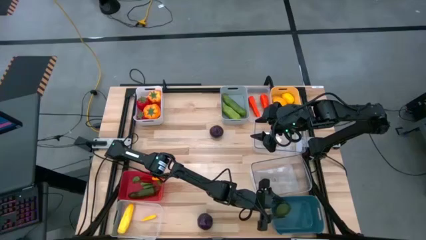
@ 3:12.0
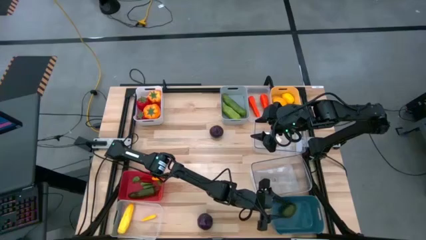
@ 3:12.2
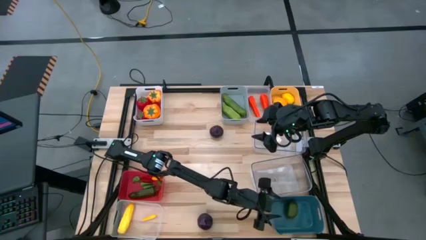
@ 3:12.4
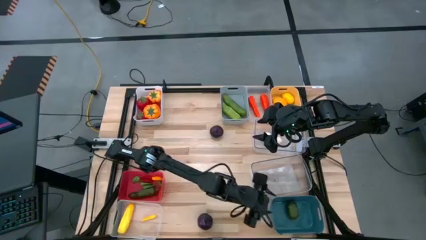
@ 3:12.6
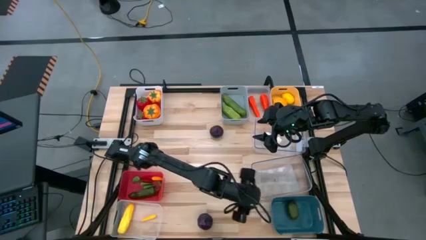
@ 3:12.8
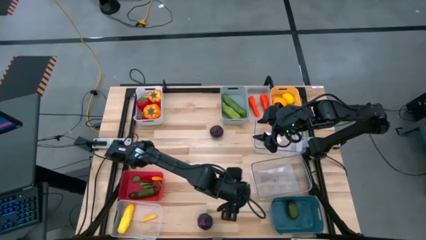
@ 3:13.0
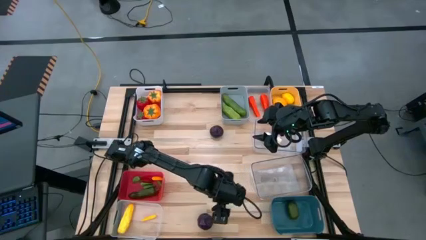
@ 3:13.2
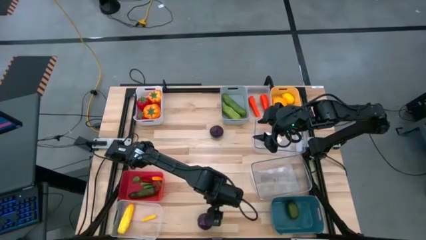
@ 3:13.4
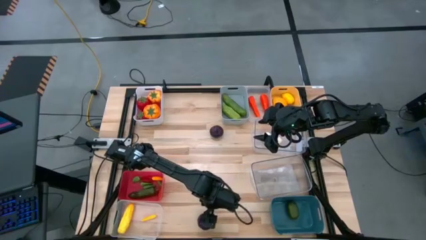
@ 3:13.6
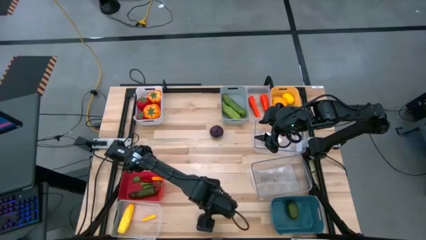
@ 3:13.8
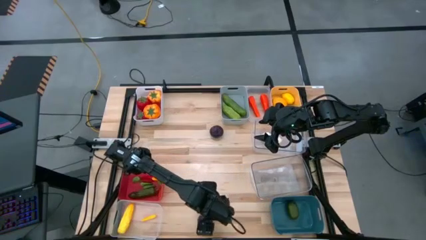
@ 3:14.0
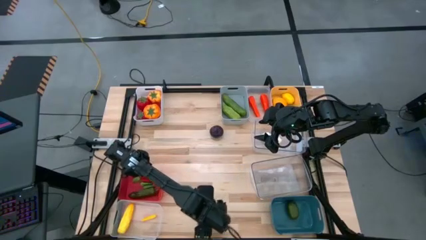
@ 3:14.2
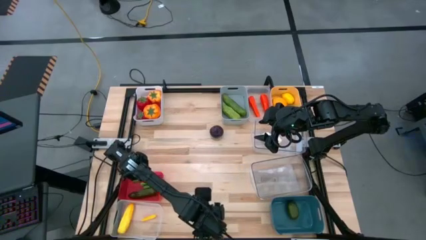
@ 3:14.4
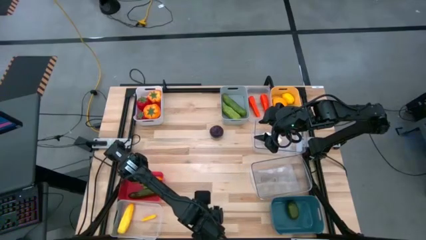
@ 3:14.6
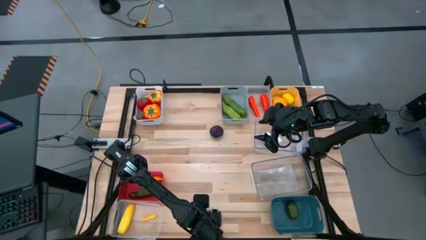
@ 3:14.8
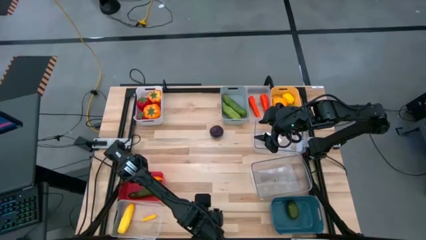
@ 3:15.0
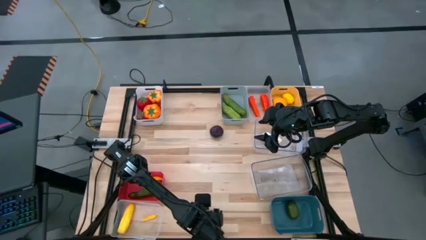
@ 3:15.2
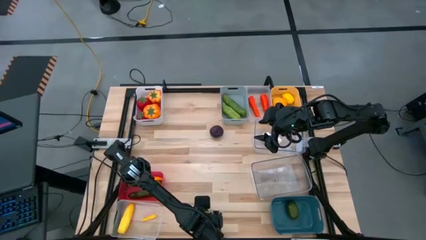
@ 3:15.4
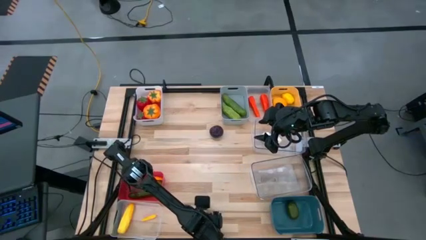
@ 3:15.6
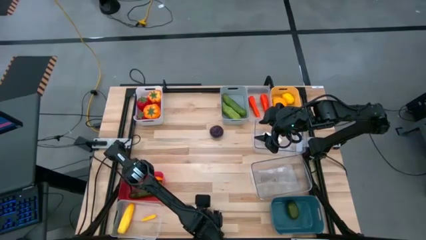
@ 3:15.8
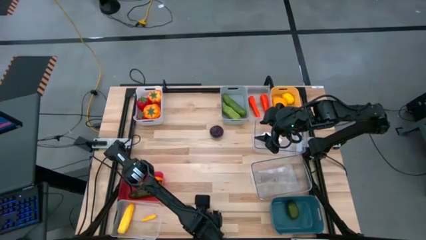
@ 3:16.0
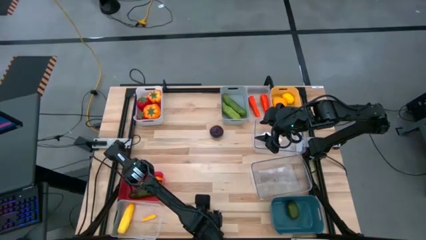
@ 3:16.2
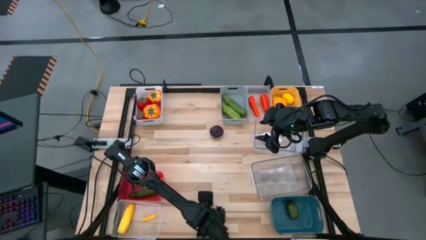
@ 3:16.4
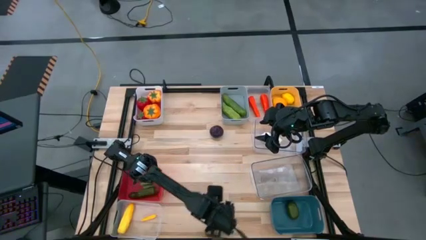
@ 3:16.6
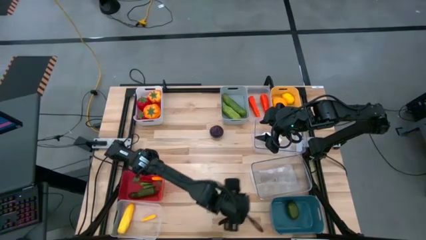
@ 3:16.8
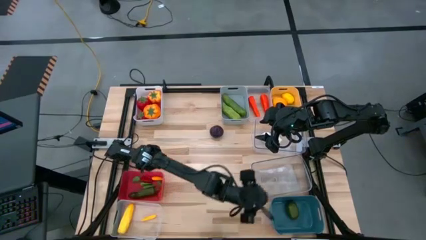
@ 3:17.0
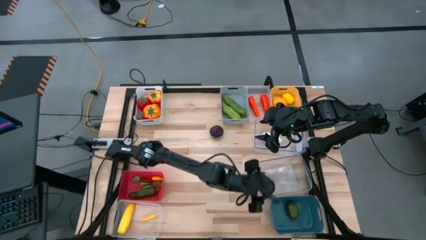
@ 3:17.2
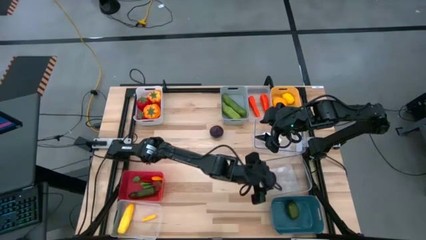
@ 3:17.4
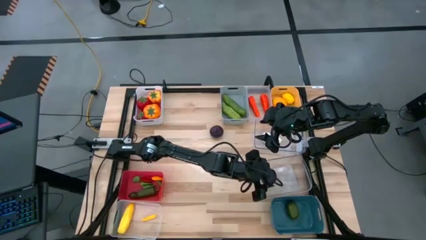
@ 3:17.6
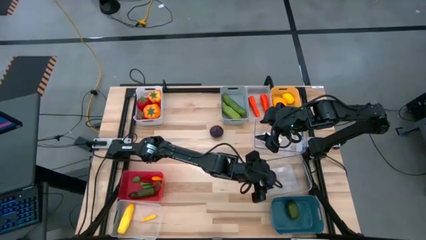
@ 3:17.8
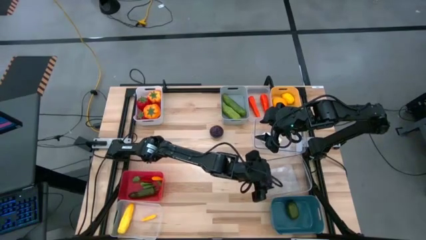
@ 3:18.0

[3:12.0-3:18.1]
Task: Sort produce into baskets
Put the bottom plum into the bottom transparent bin

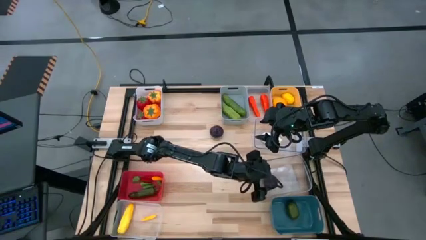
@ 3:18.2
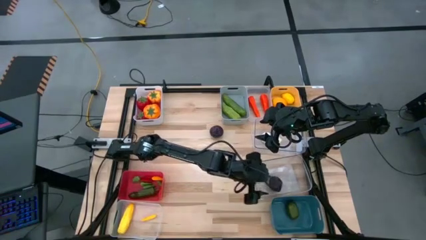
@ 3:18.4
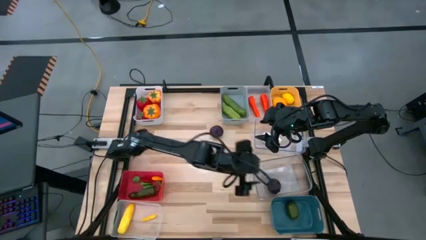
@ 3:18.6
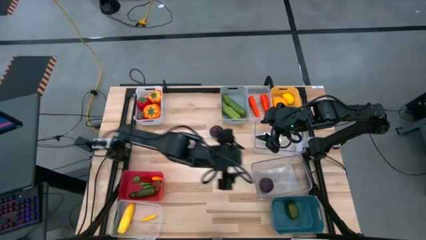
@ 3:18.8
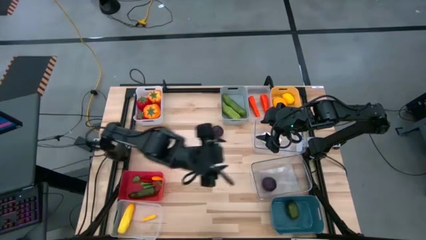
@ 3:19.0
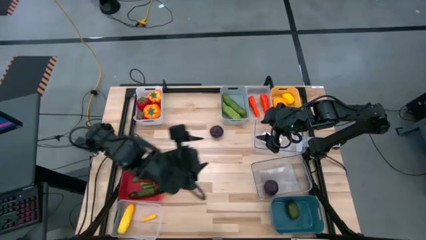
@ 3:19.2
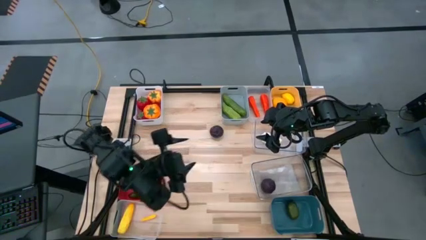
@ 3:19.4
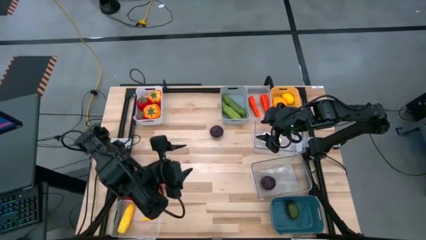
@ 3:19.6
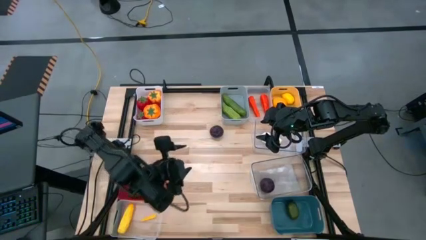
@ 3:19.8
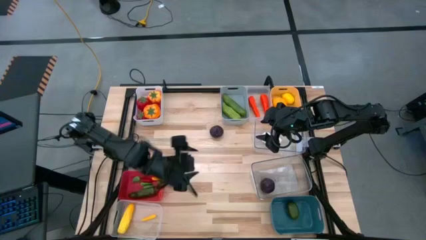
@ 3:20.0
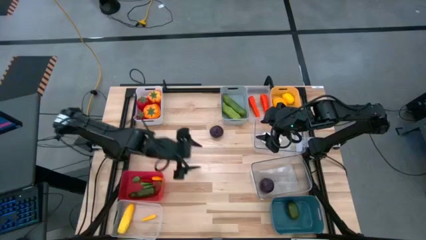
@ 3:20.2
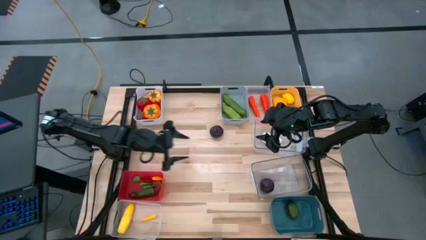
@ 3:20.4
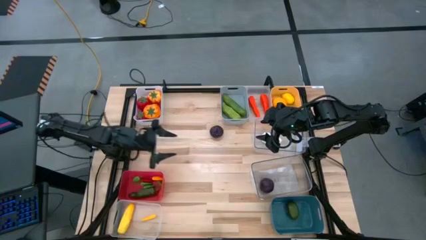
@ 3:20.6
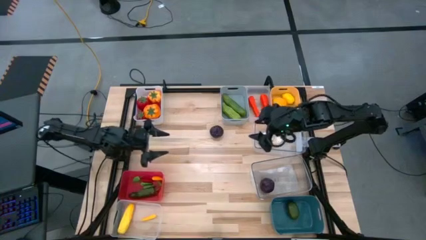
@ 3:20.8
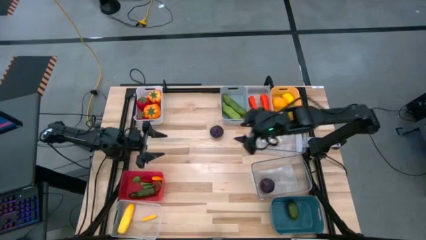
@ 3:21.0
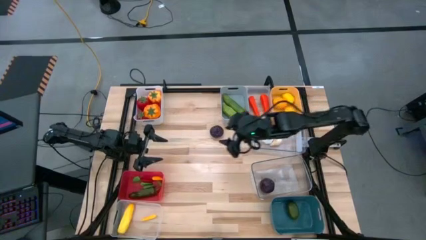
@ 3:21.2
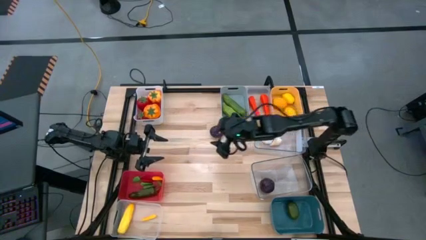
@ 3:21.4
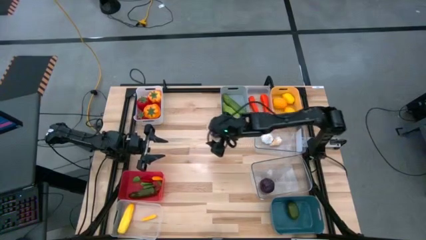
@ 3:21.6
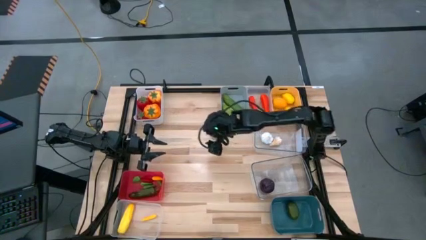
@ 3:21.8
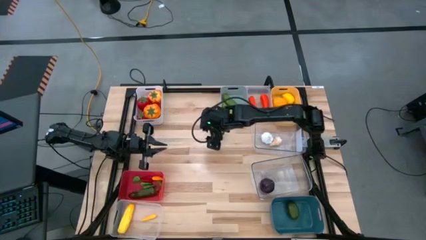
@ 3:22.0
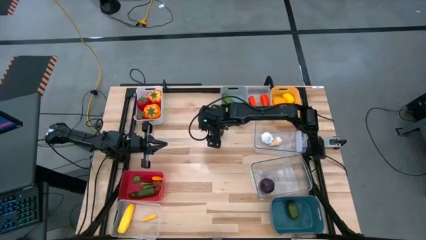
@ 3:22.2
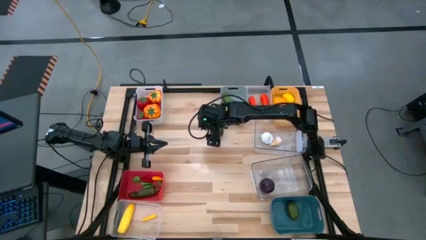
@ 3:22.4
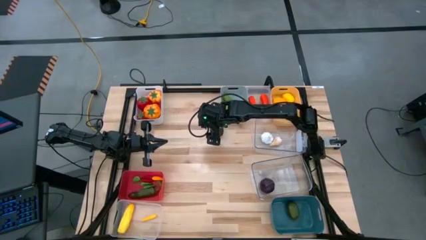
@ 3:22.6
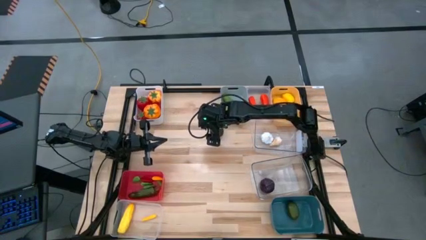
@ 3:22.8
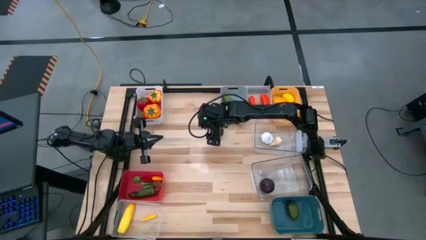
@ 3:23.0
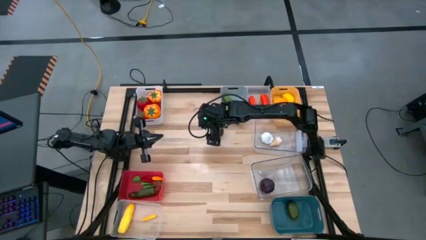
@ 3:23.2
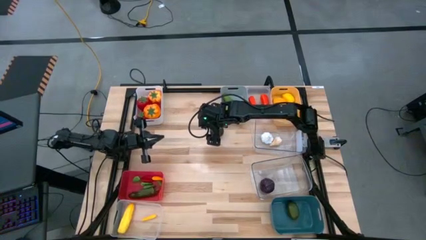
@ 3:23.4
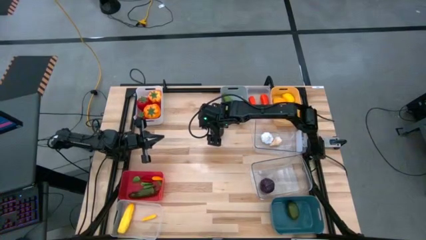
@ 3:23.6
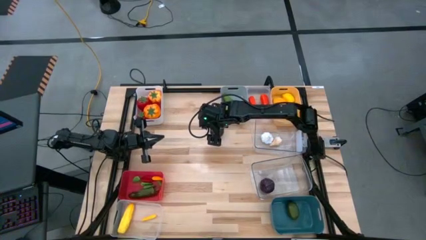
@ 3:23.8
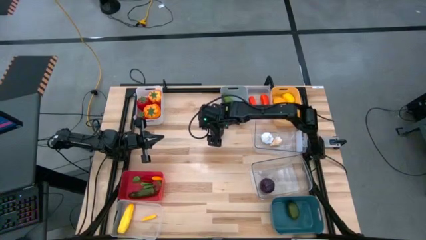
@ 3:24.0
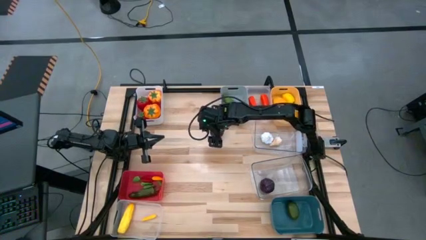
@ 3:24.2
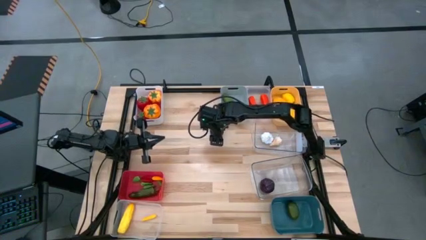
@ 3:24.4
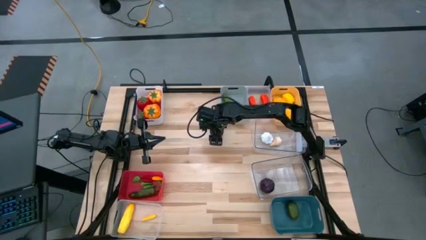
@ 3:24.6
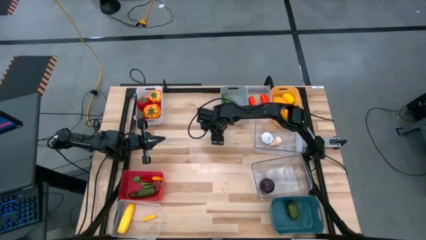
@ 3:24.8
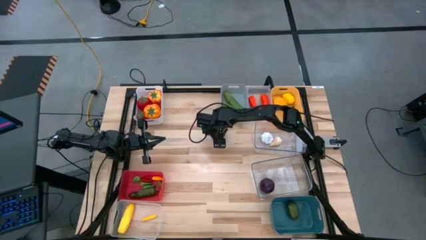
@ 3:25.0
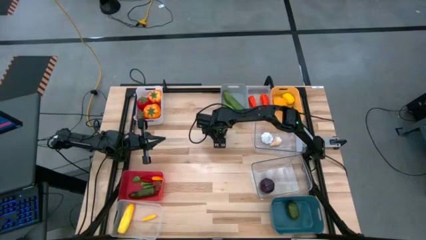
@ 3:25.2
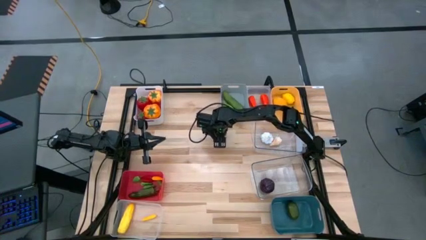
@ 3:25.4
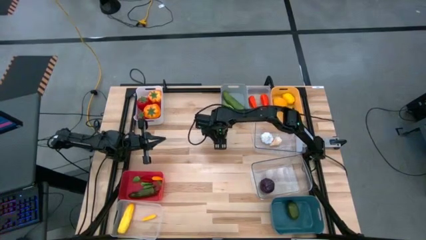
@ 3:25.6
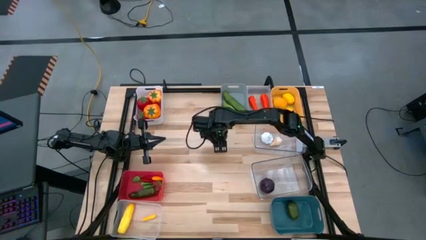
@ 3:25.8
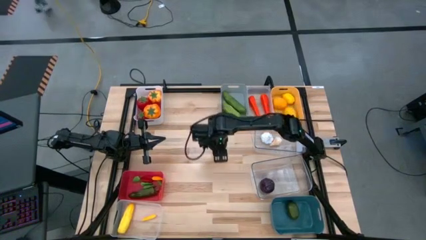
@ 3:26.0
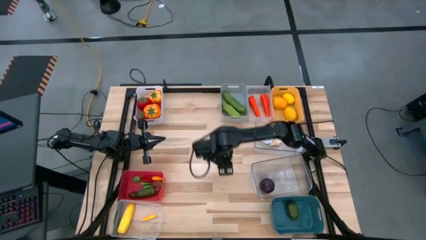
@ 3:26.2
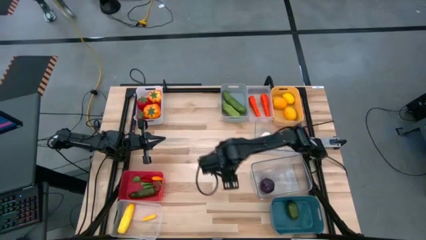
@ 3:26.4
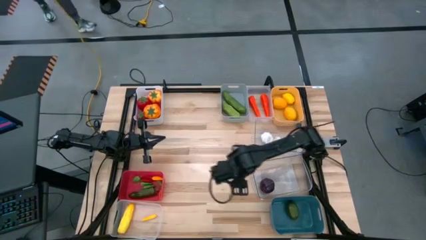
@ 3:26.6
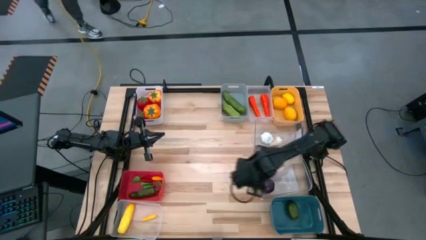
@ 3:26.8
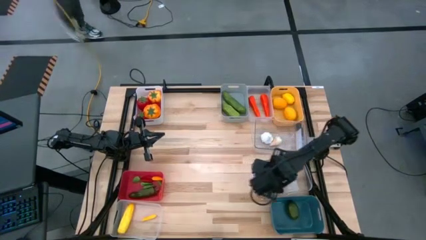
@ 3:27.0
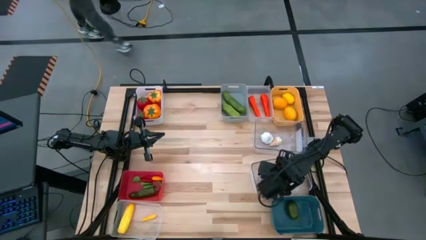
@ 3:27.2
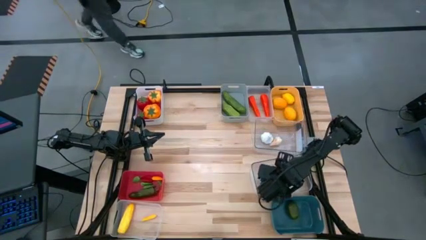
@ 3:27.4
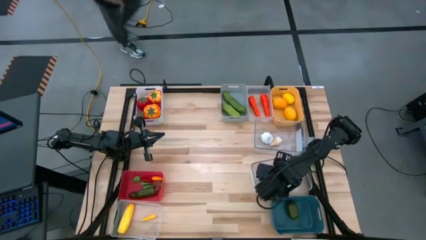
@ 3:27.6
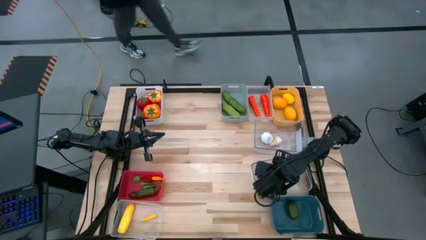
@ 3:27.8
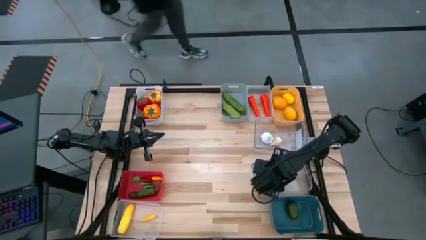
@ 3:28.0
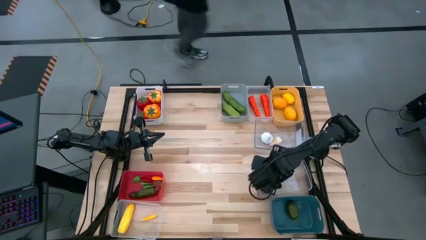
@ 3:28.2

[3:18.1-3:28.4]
Put the plum into the bottom transparent bin
